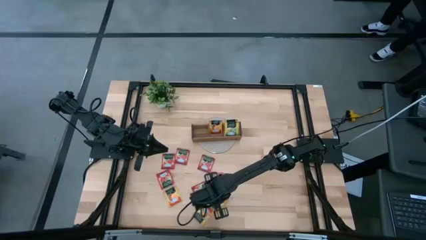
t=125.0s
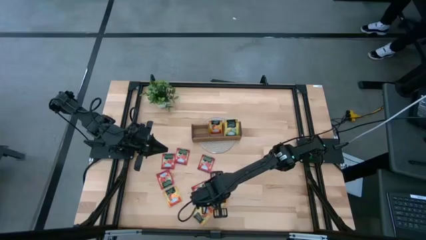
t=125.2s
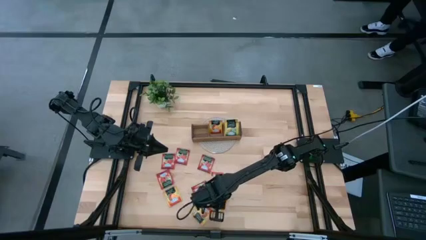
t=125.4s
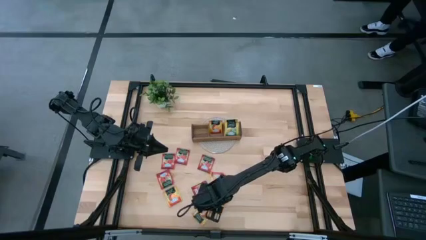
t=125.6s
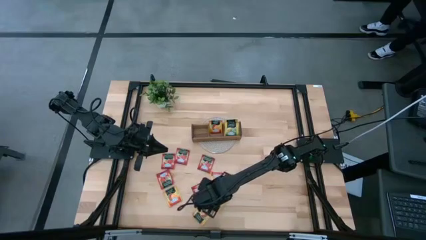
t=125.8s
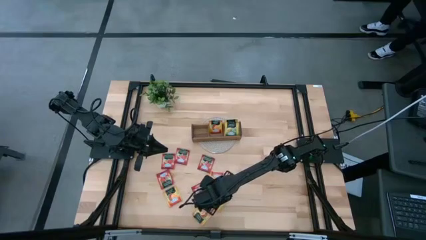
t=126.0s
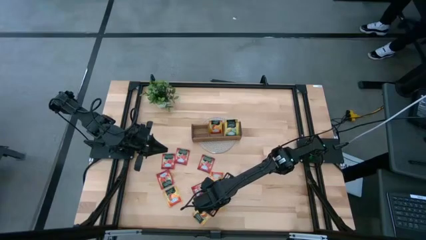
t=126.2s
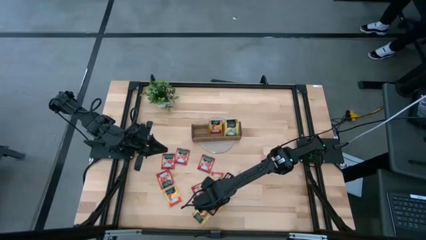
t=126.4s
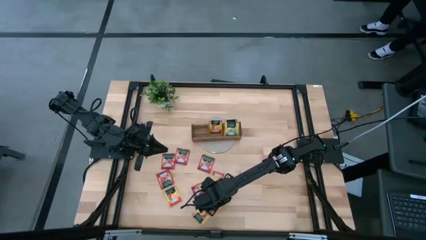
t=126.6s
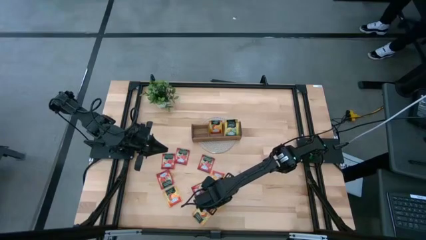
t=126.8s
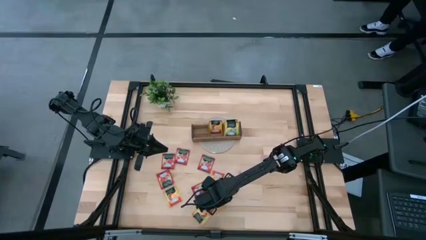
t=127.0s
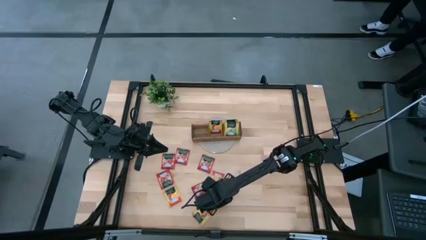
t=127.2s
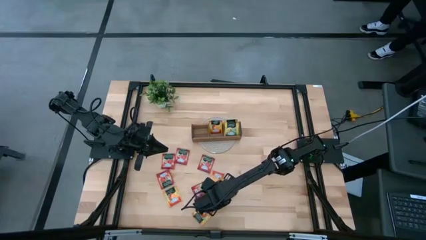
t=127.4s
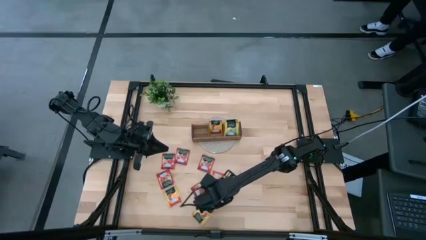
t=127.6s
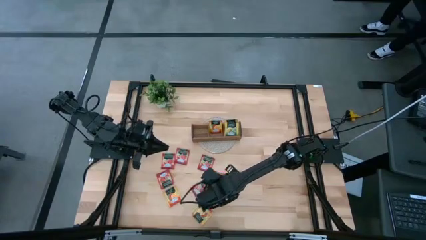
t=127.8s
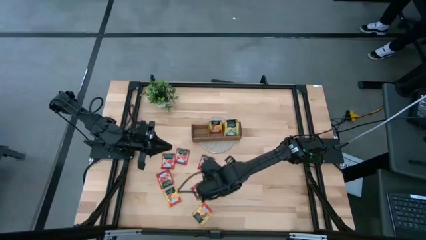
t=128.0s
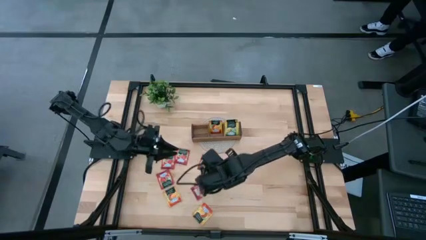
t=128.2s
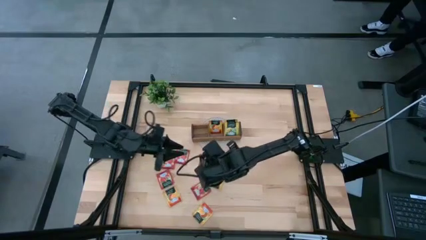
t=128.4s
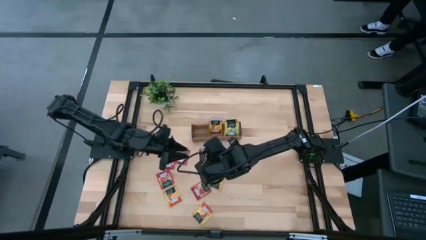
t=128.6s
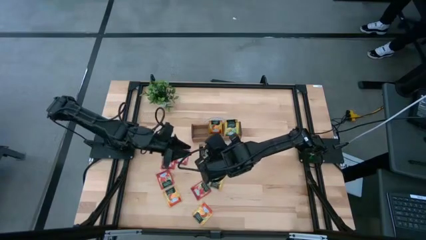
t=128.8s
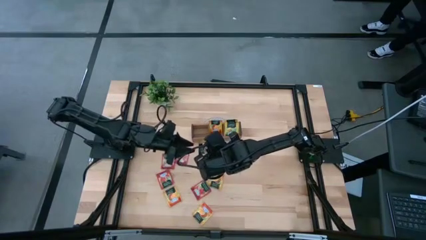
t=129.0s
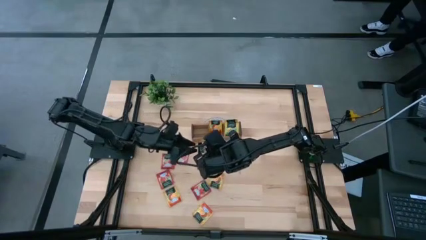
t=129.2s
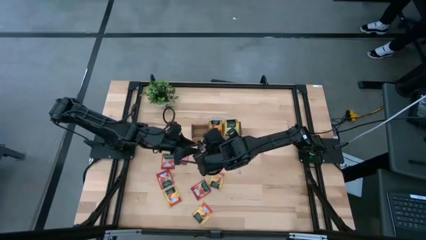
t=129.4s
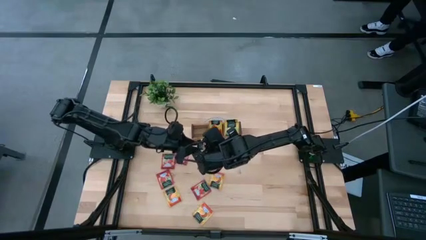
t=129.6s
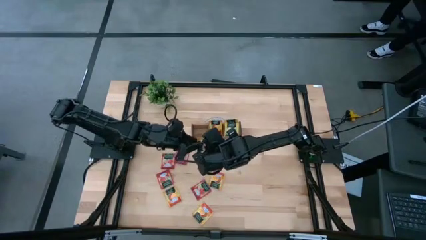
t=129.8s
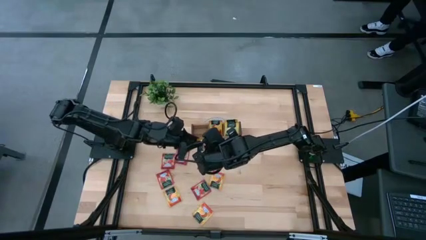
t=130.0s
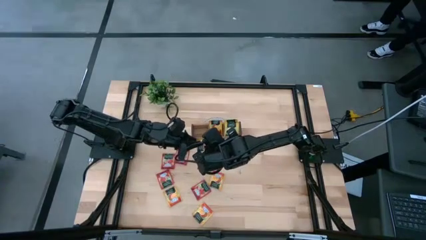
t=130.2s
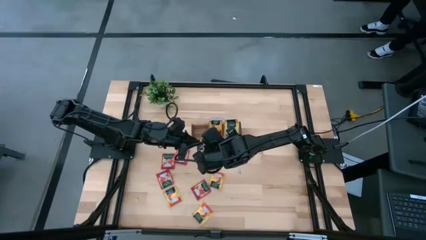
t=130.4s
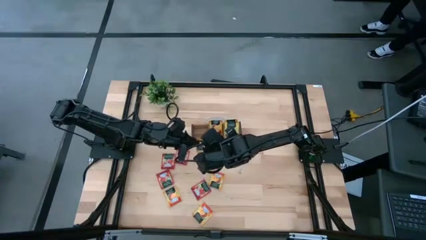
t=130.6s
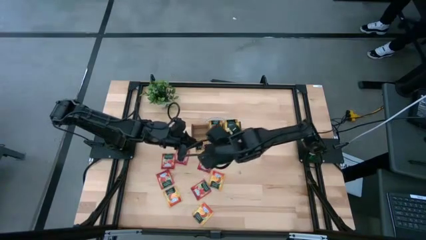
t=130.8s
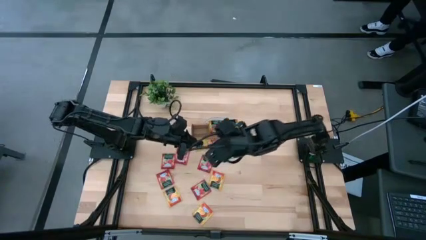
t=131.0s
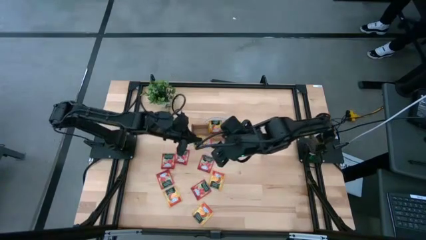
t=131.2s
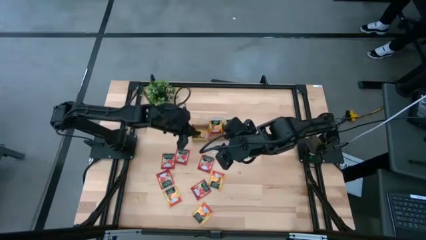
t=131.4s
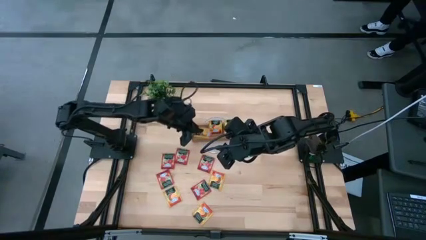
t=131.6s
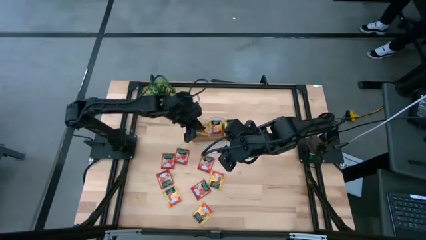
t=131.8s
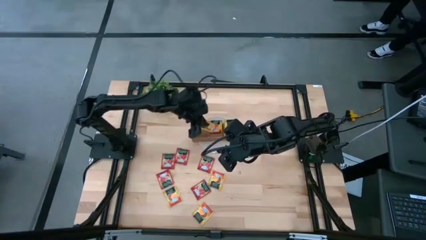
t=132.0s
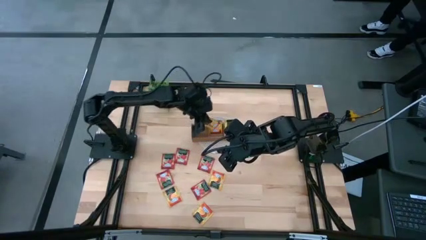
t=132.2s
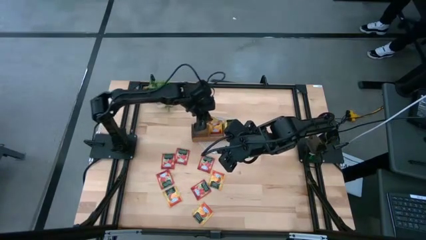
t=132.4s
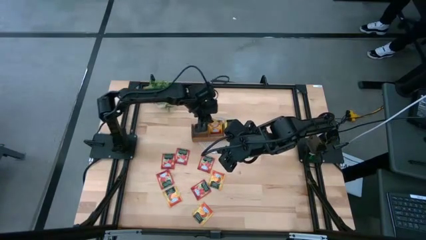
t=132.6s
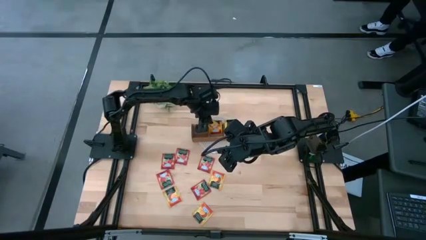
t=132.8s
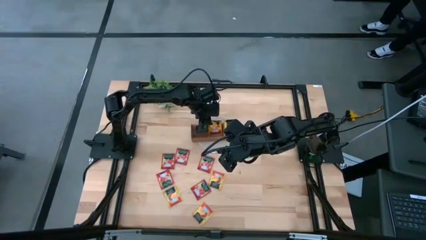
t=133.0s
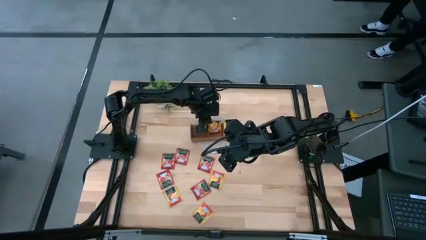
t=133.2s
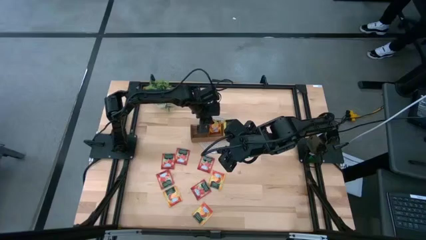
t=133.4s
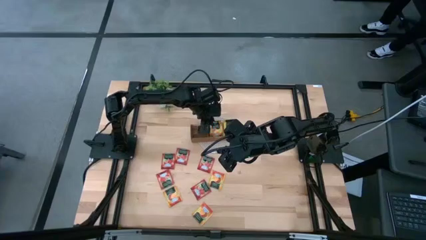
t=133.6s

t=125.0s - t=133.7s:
Task: Pick & Place Tea
Put the orange tea bag into the middle section of the wooden organizer

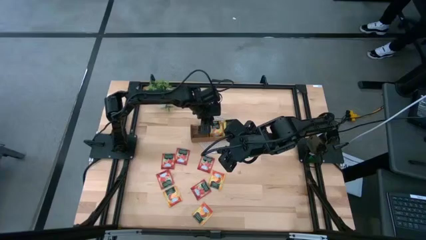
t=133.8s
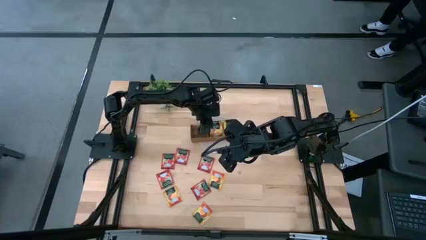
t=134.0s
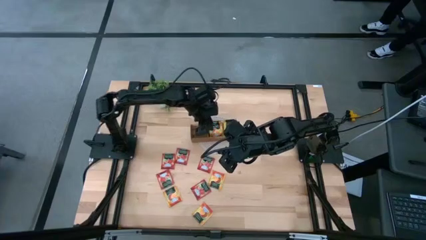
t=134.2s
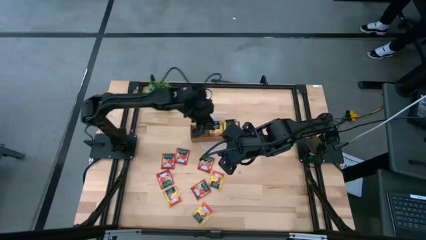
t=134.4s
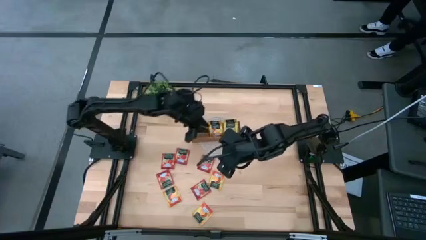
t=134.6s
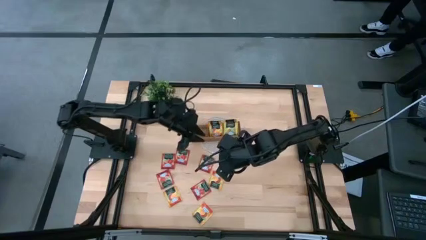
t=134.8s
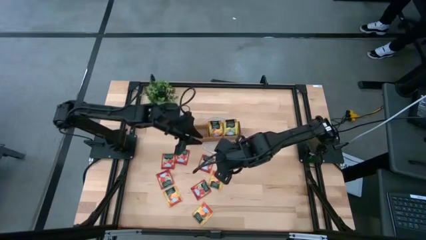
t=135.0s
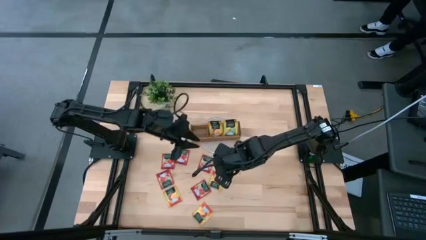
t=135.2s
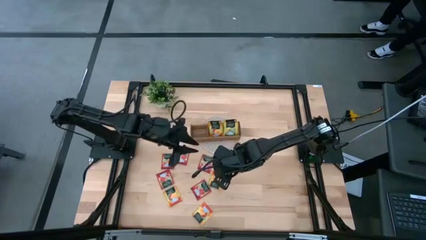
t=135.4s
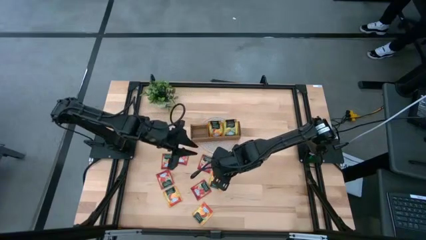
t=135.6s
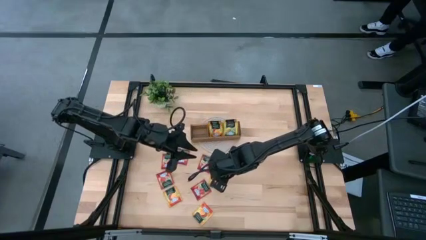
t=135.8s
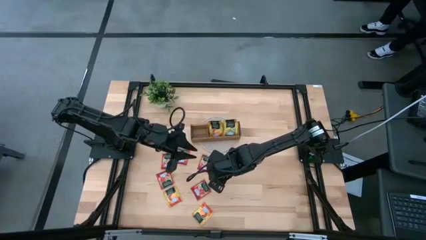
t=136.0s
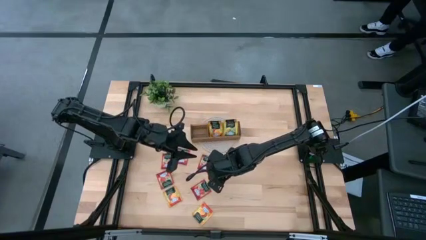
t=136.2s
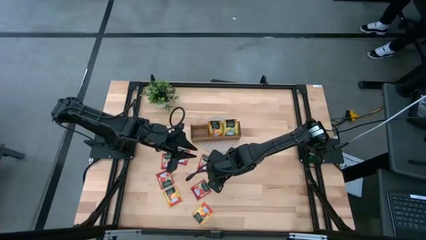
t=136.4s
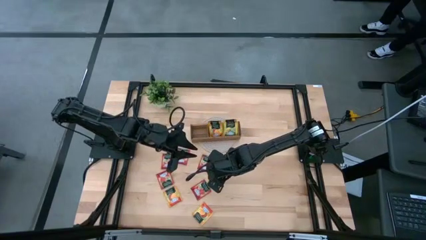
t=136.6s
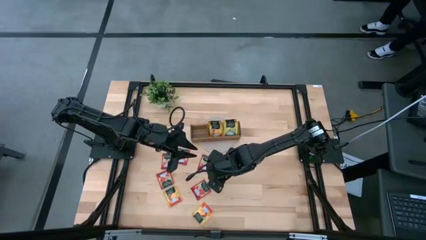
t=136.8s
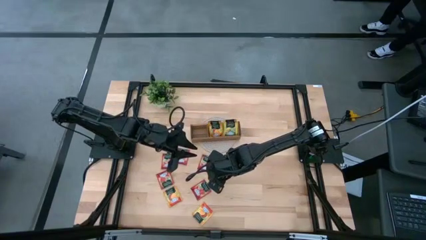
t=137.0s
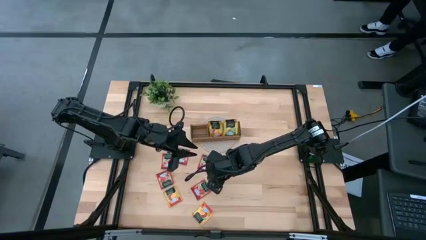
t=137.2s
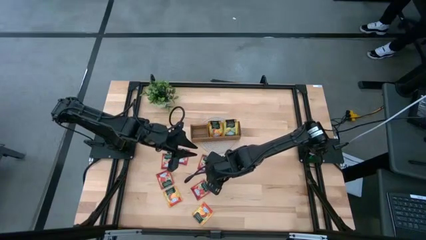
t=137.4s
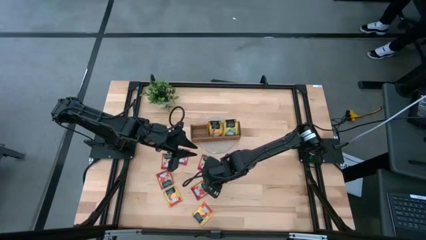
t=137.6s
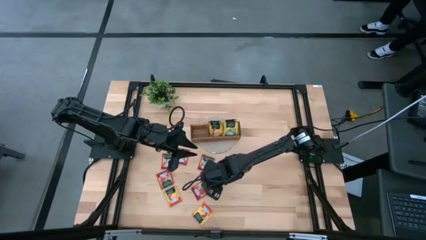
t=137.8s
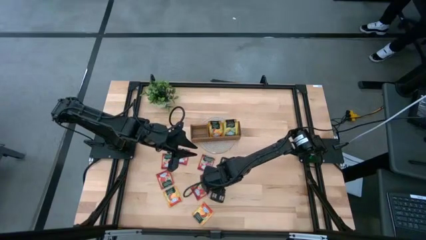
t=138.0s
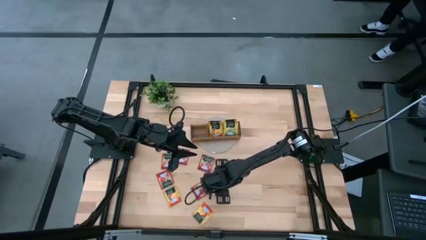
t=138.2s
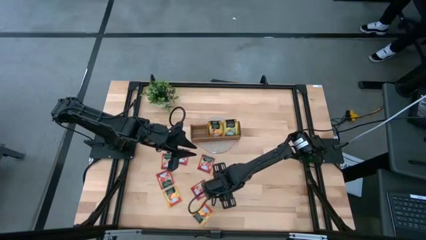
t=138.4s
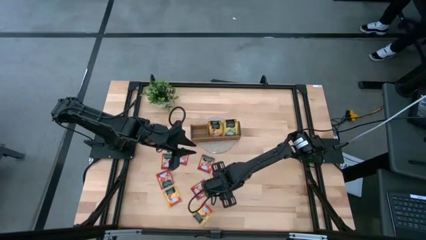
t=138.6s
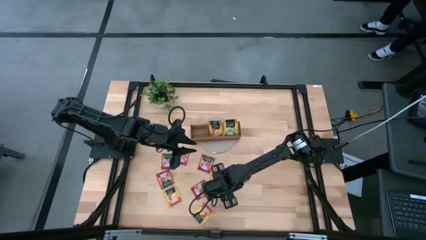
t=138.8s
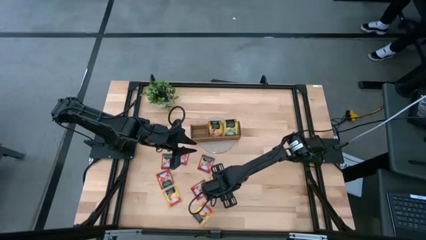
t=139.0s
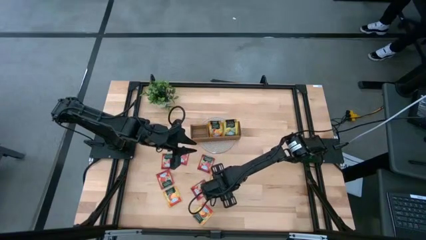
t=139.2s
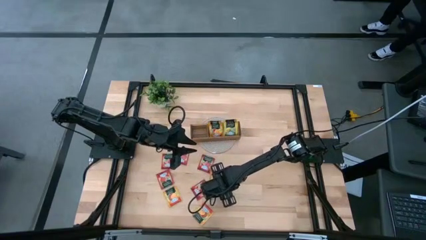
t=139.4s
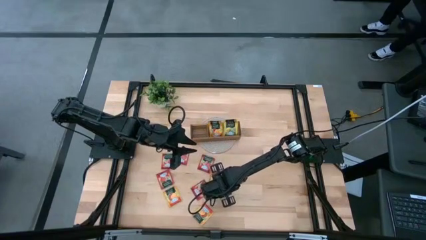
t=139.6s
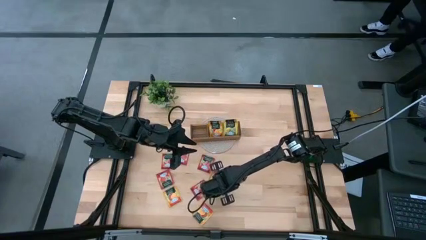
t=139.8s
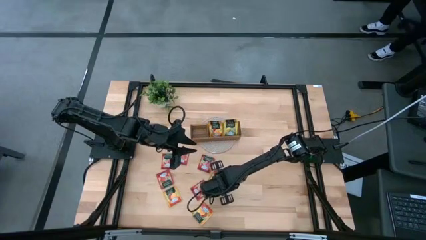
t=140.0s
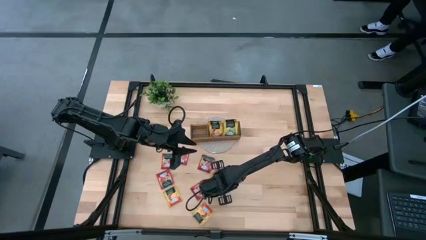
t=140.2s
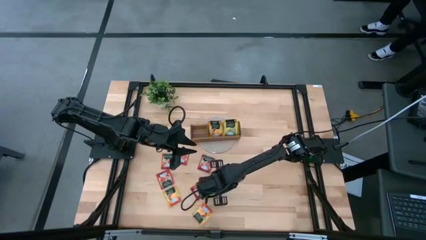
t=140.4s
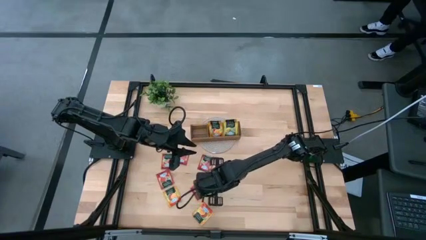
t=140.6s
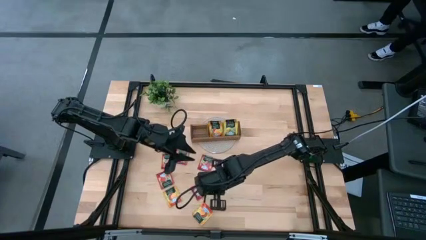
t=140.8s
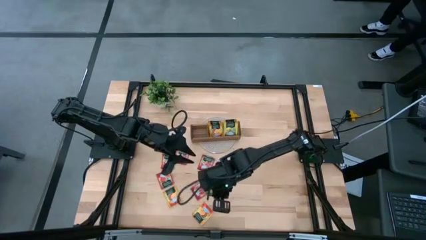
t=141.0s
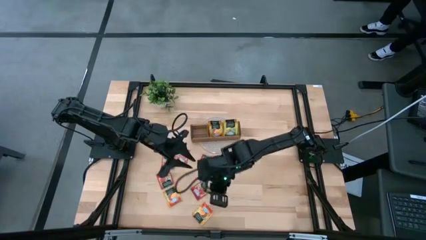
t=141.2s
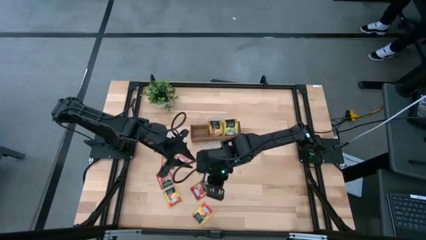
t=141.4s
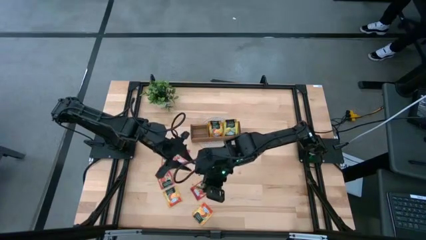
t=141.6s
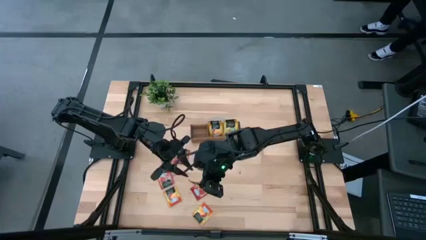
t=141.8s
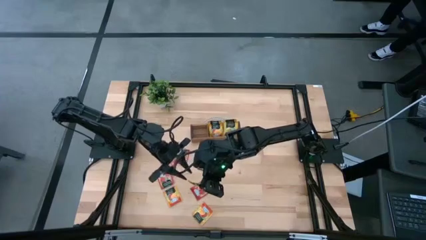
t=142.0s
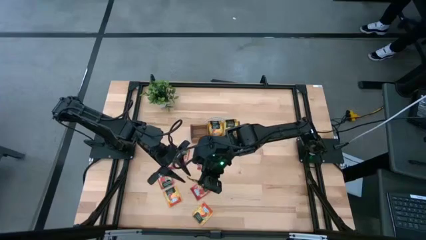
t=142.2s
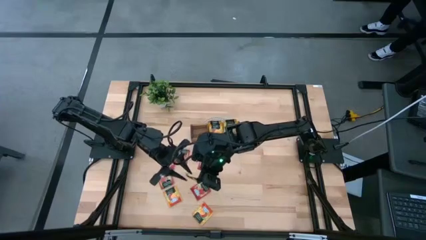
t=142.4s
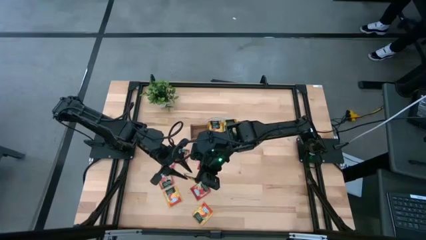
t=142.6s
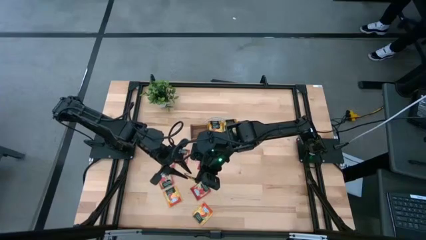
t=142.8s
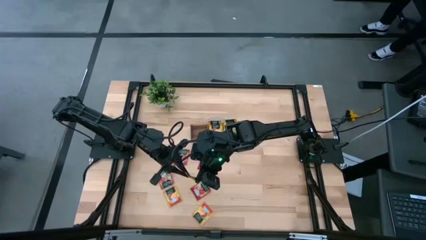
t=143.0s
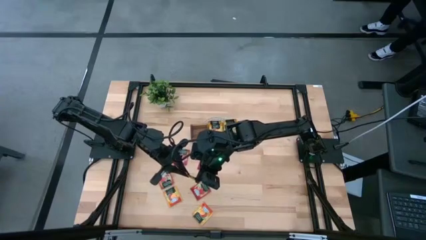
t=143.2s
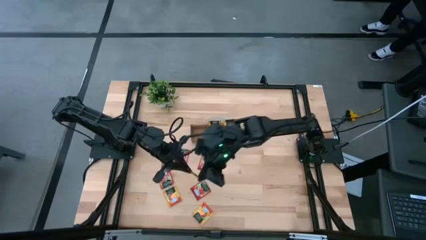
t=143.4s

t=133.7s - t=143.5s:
Put the orange tea bag into the middle section of the wooden organizer
